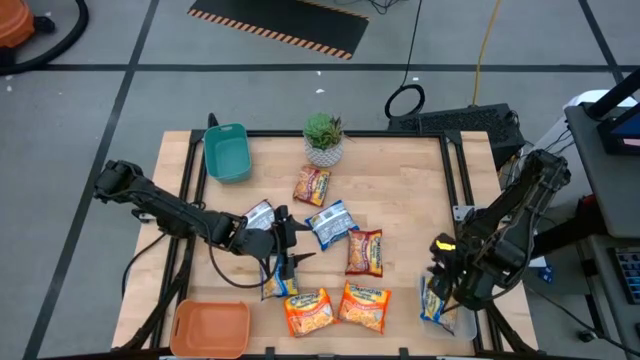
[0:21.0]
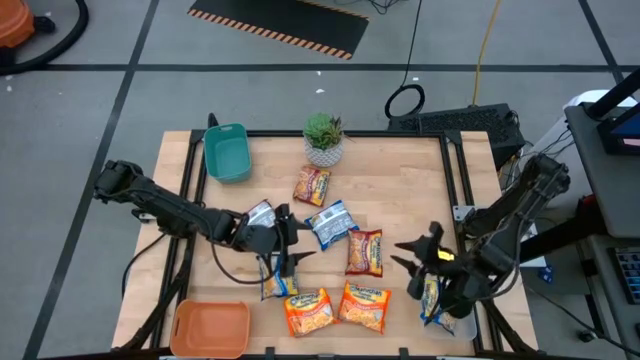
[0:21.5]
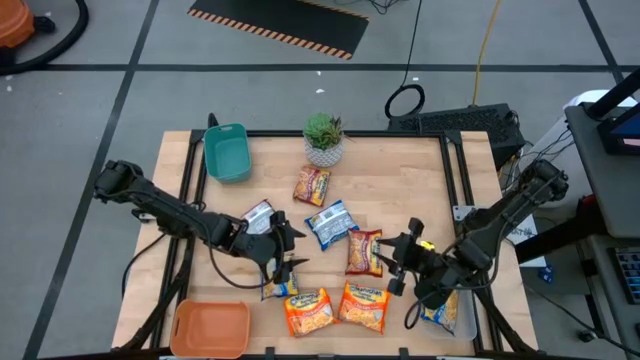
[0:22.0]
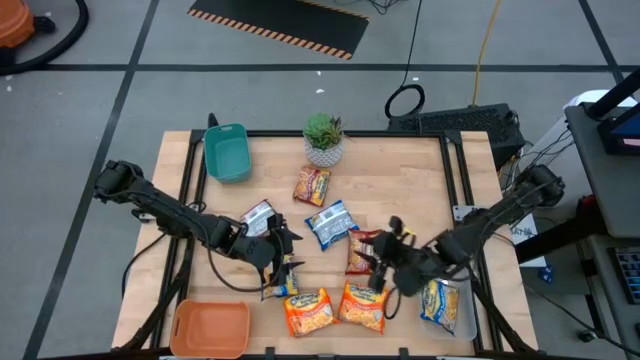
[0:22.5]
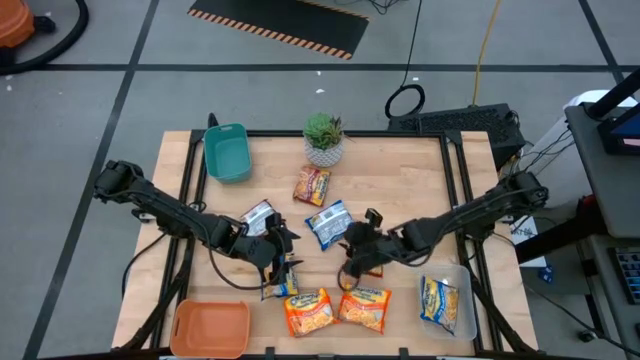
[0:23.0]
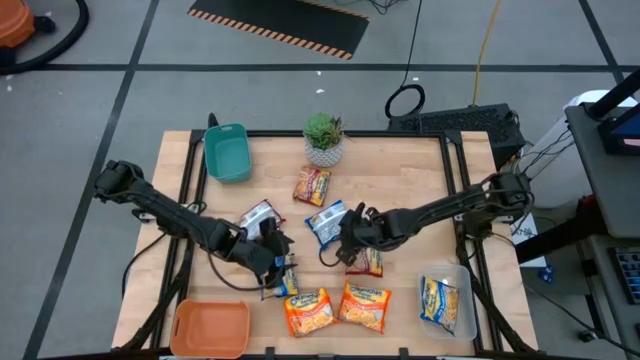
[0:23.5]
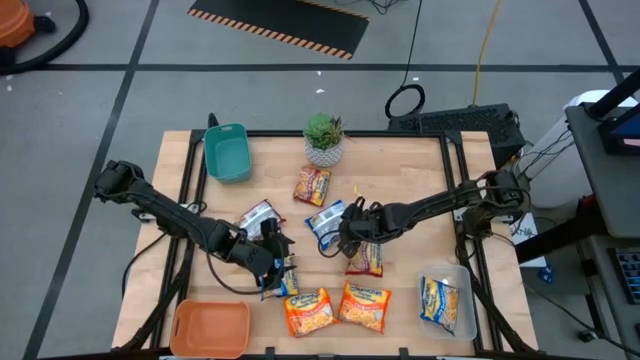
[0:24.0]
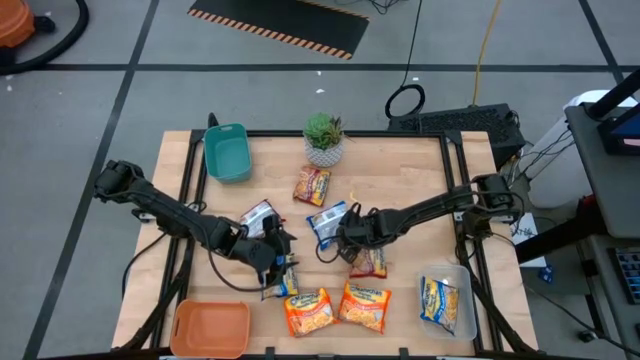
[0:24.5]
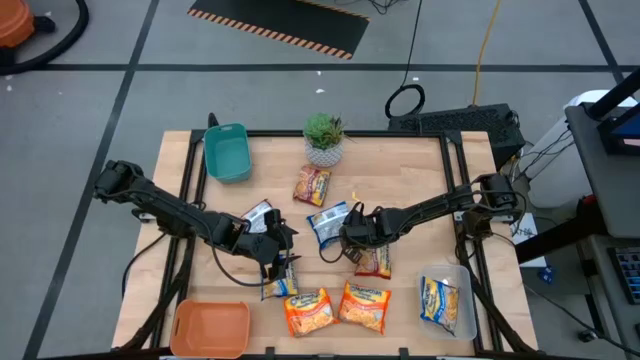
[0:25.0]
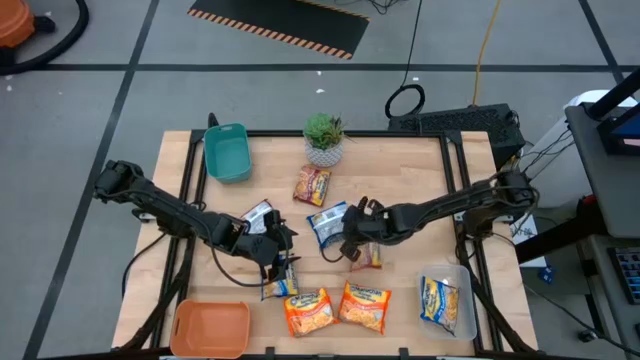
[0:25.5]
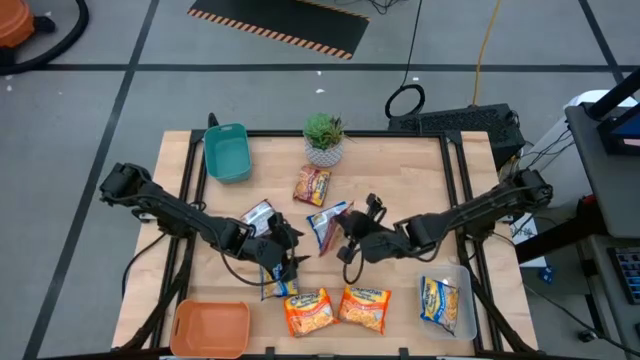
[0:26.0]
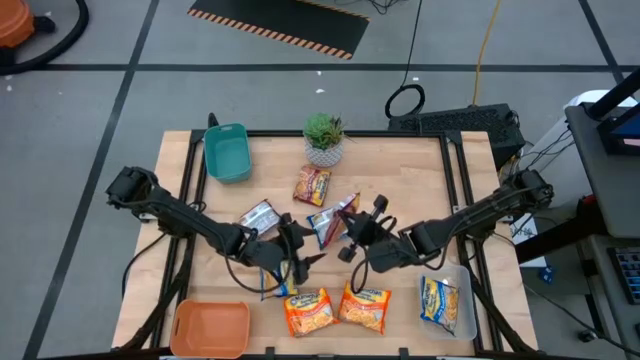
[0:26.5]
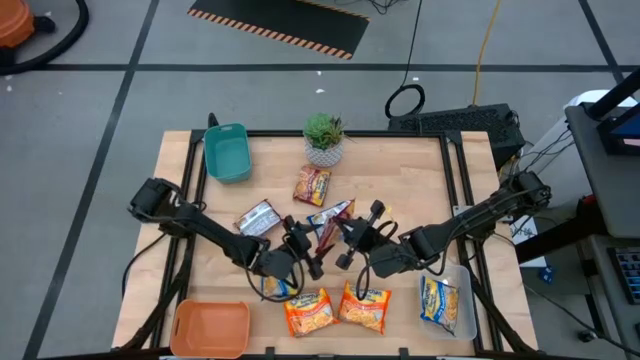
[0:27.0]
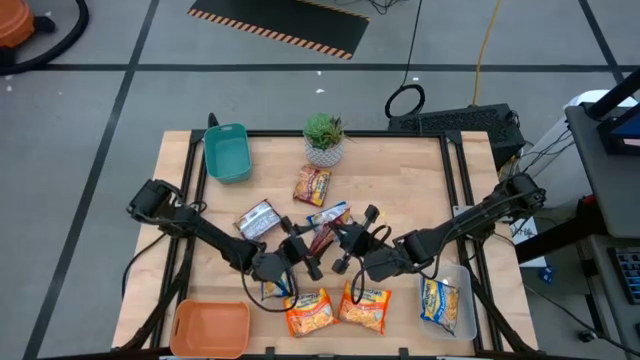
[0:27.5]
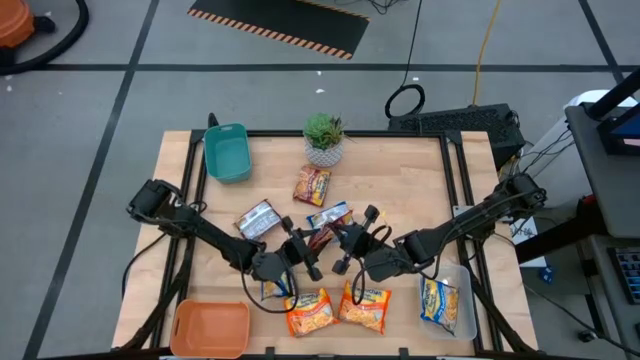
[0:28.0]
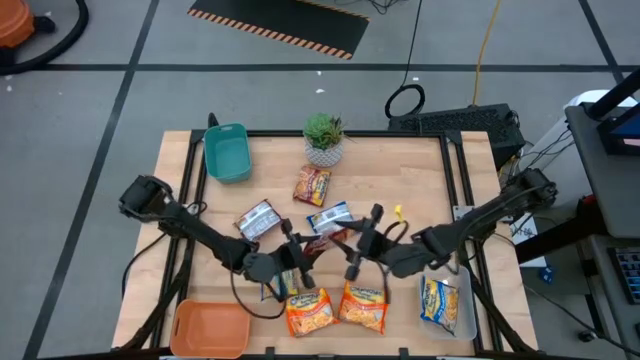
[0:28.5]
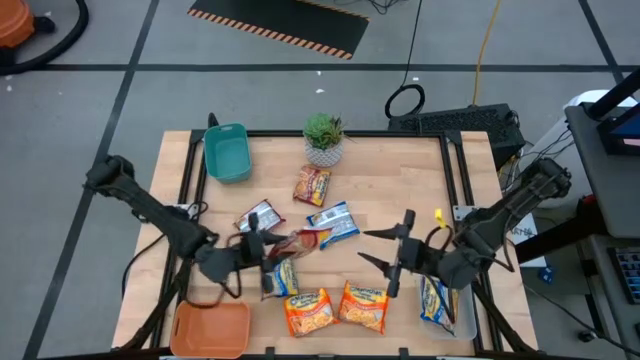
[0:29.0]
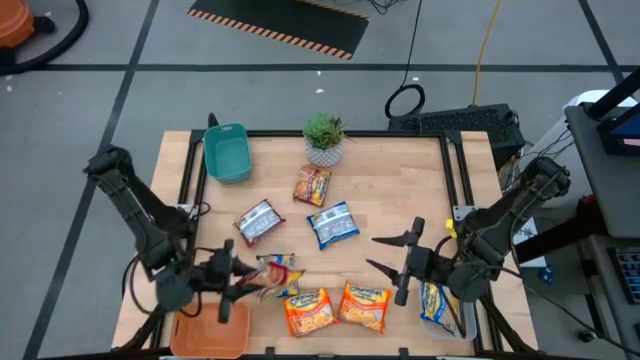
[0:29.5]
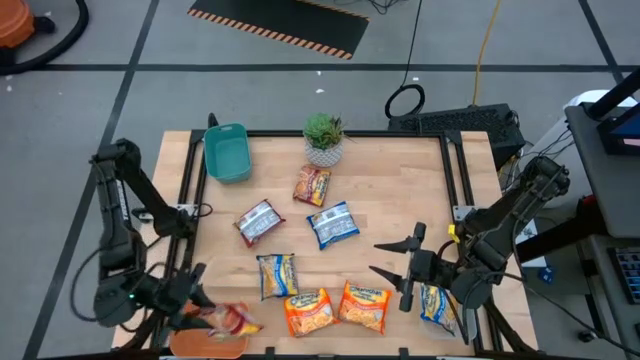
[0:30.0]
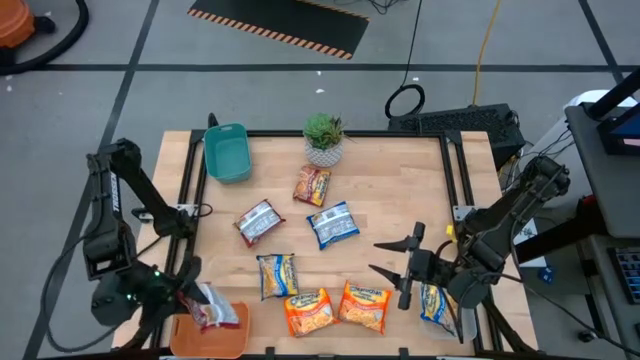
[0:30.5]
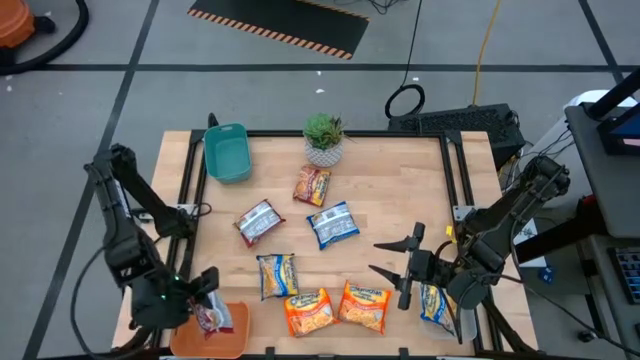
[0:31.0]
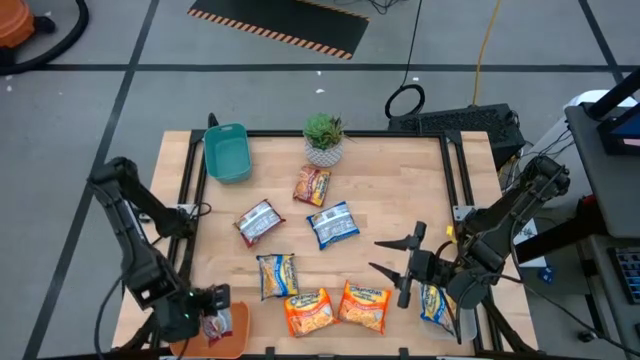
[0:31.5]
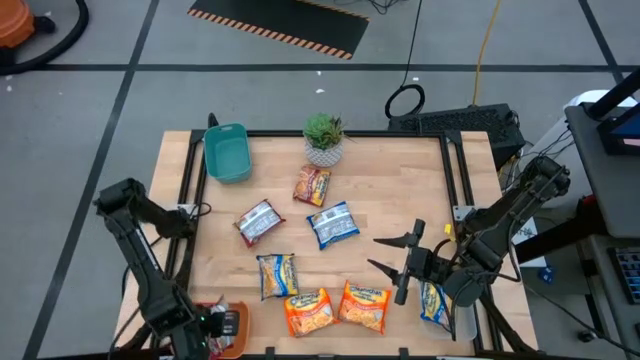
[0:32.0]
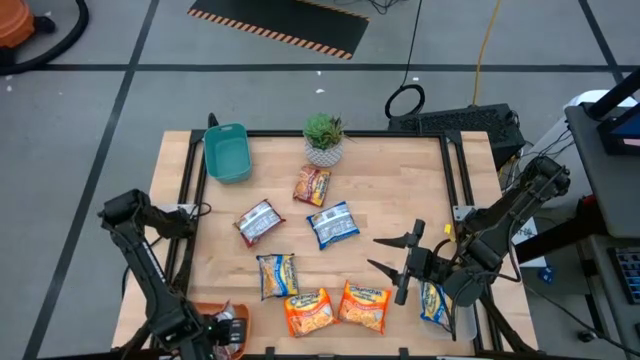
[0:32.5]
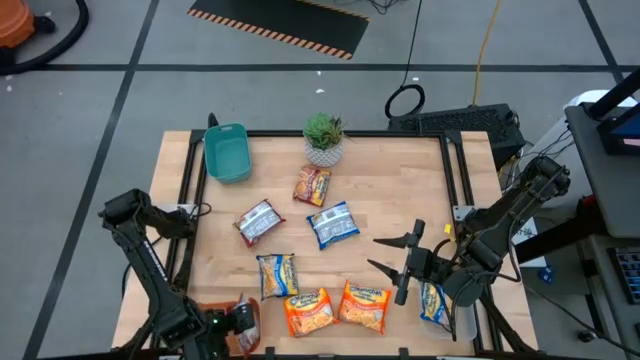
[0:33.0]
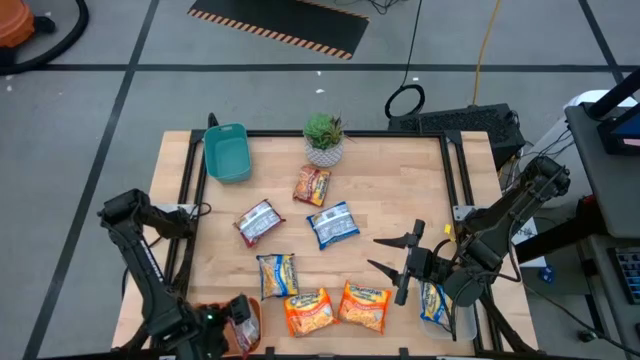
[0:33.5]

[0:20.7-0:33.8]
Task: Sort Maruchan noodles
Put the bottom right red noodle pack into the orange bin

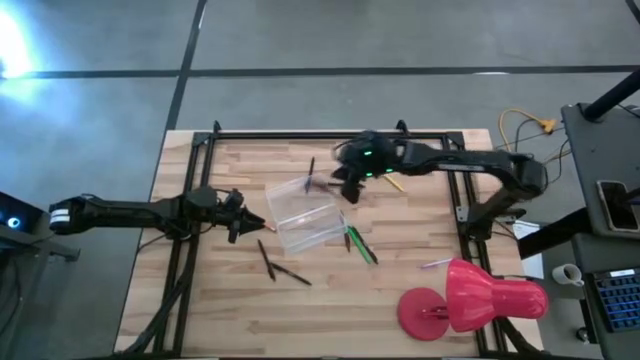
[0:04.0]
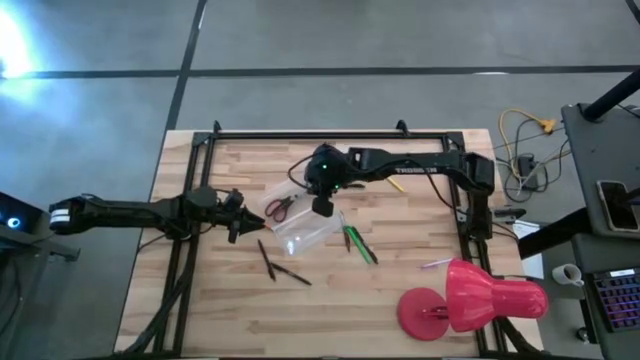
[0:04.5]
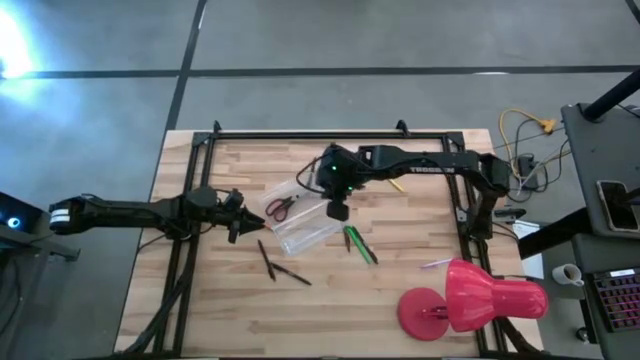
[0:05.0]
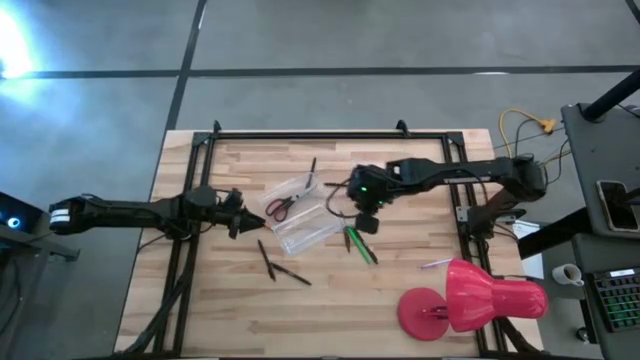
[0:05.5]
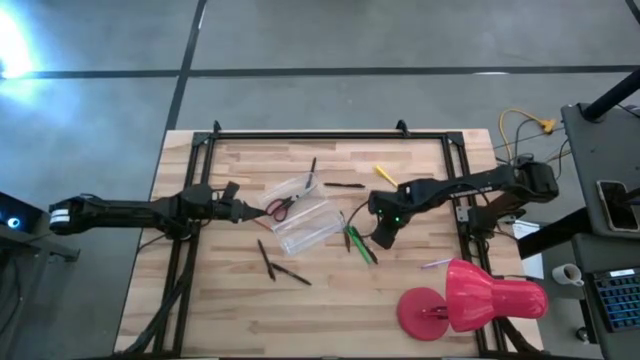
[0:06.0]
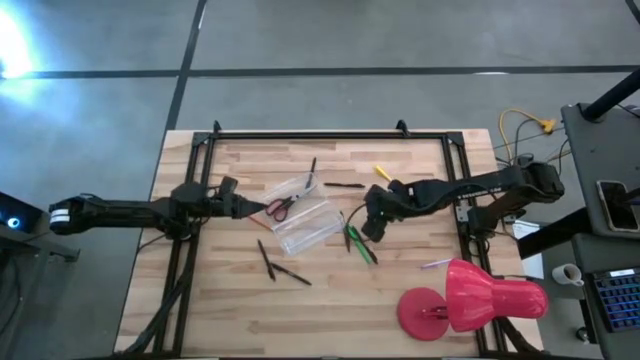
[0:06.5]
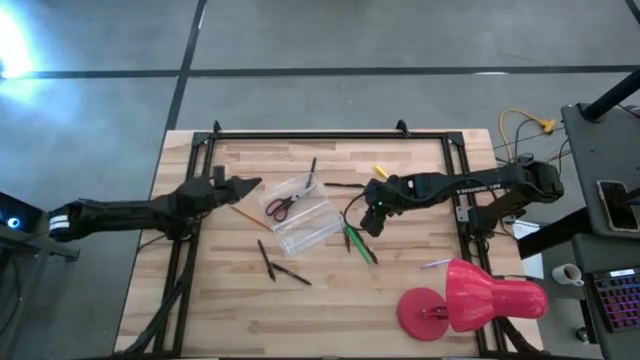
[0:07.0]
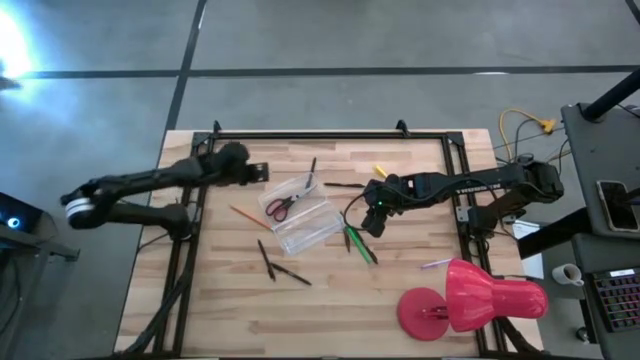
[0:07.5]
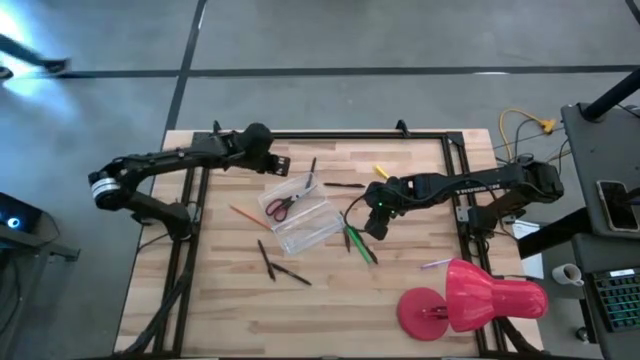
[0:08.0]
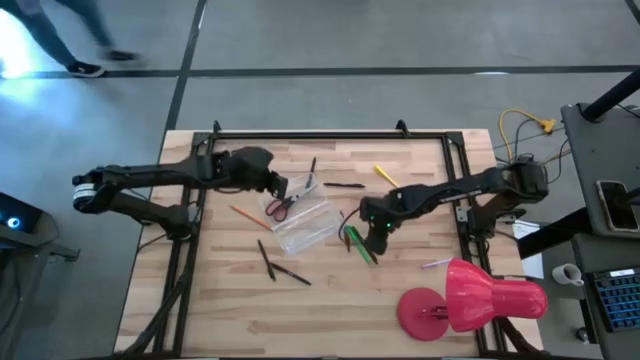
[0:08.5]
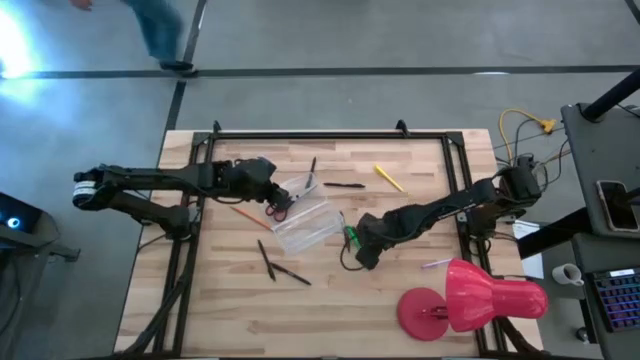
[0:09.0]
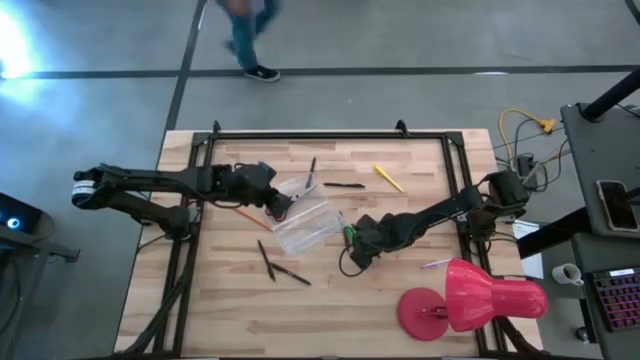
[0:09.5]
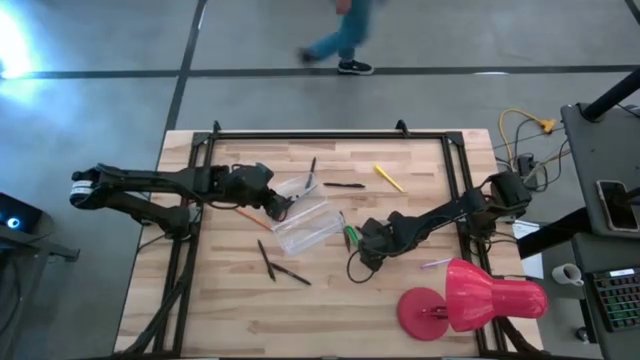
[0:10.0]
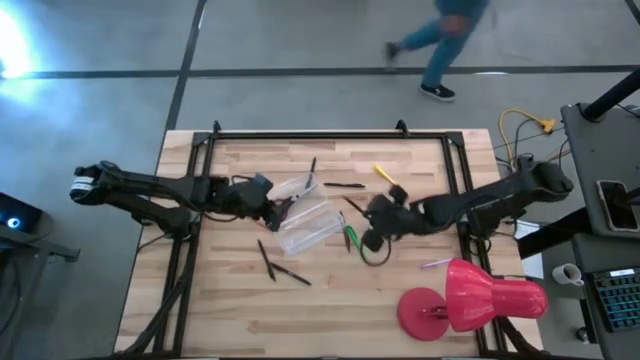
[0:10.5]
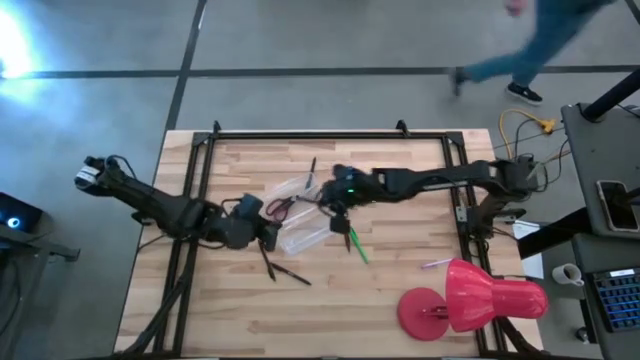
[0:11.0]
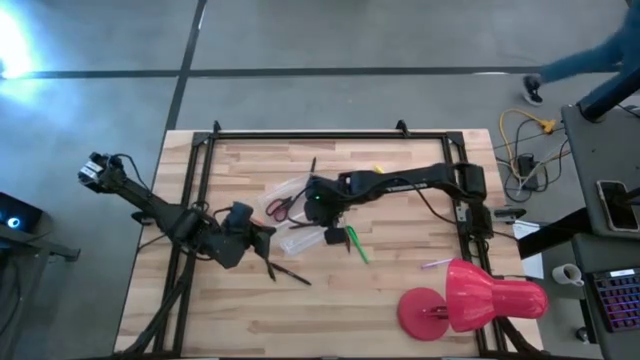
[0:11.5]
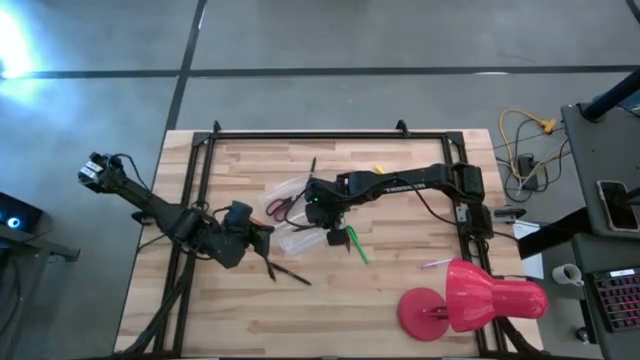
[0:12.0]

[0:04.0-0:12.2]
Task: Pick & place school supplies into a supply box
Put the black ball pen in the stationery box

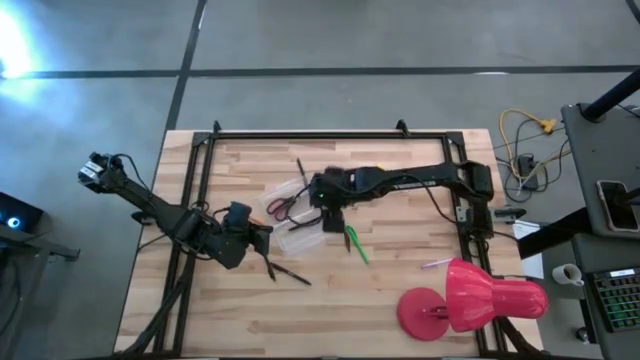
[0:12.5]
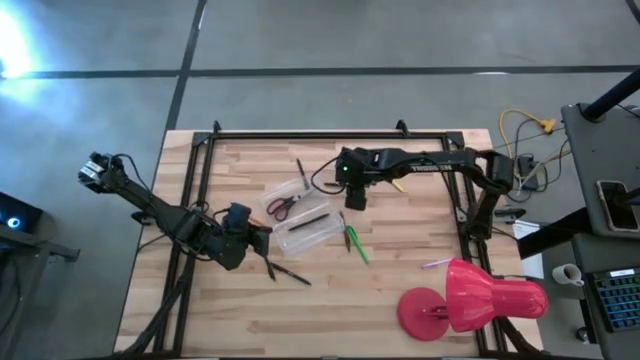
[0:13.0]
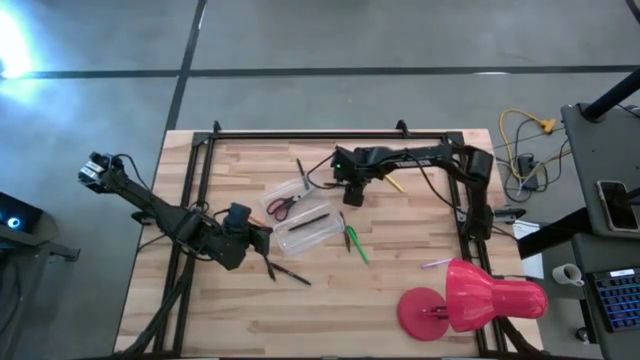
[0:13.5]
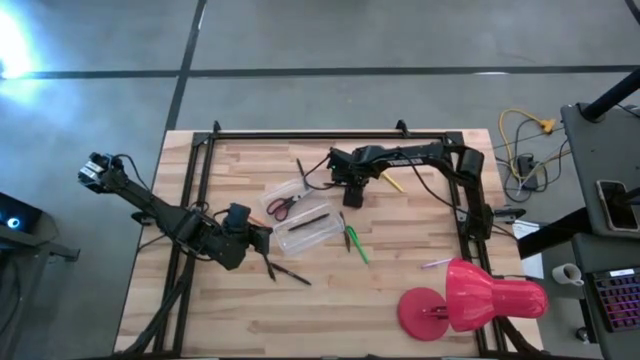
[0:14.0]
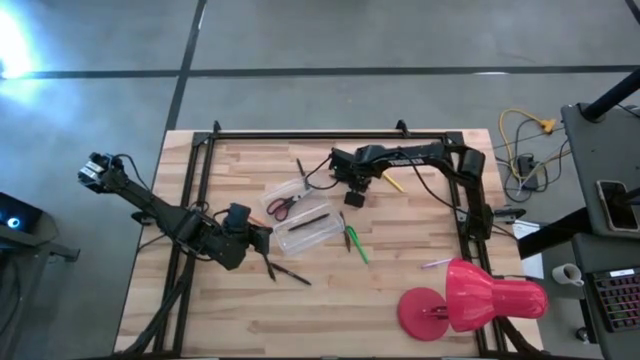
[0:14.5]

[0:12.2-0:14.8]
Put the black ball pen into the stationery box
